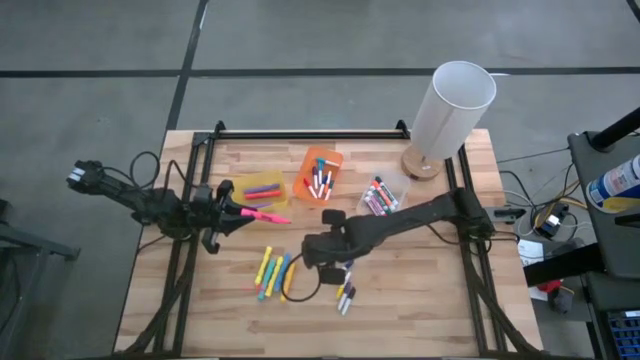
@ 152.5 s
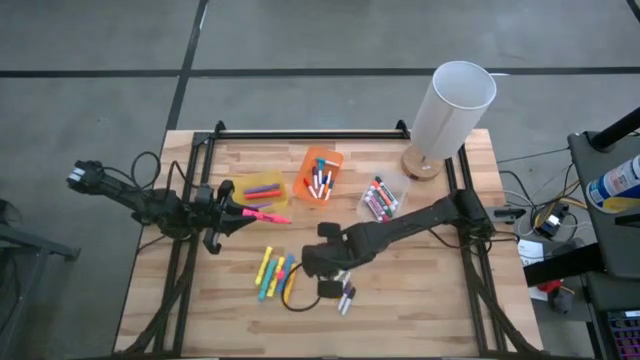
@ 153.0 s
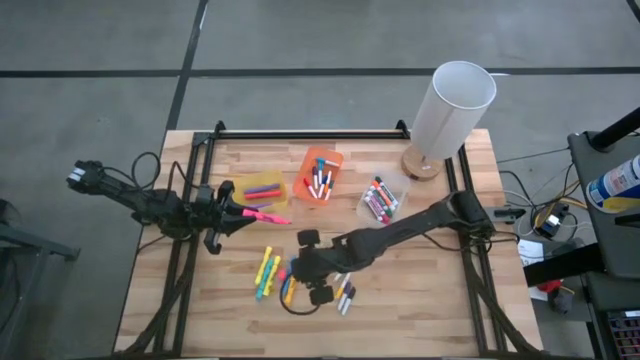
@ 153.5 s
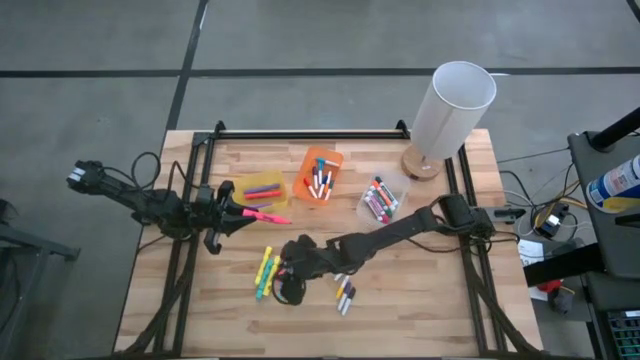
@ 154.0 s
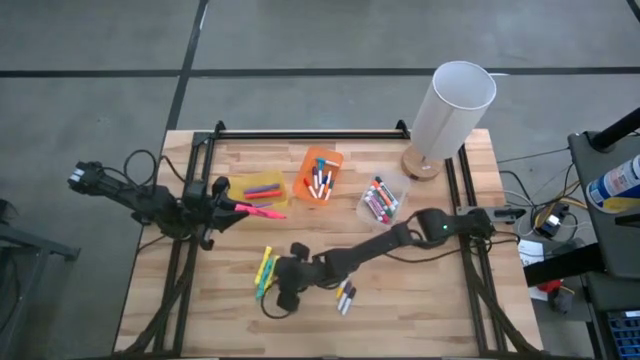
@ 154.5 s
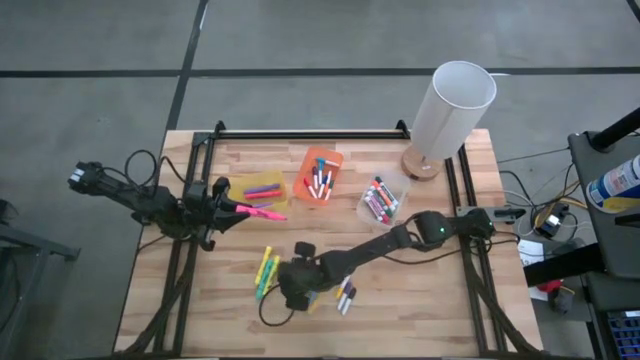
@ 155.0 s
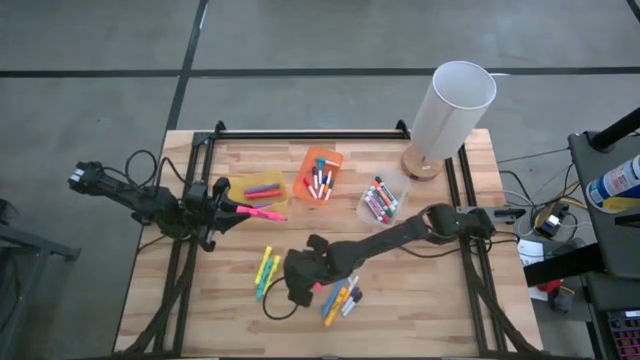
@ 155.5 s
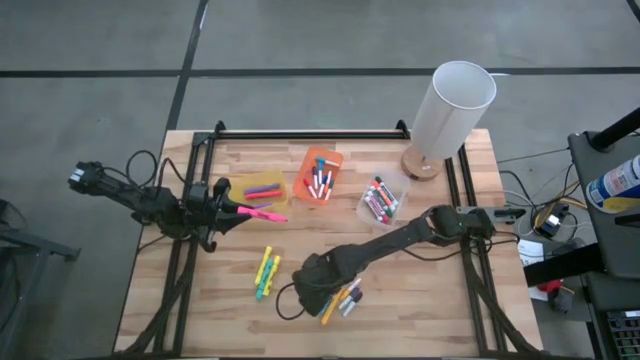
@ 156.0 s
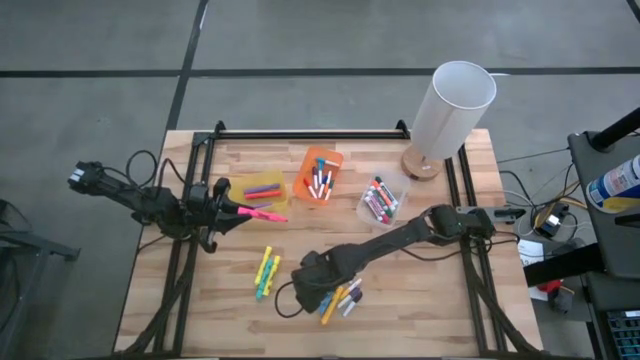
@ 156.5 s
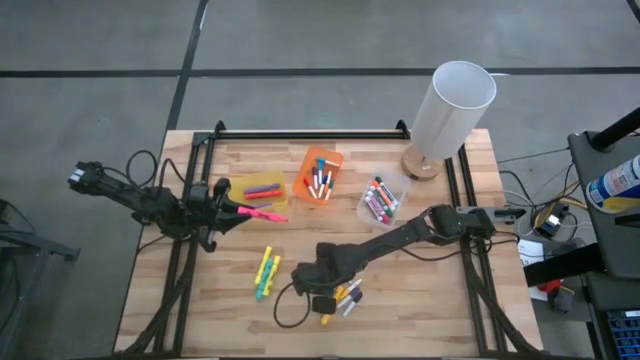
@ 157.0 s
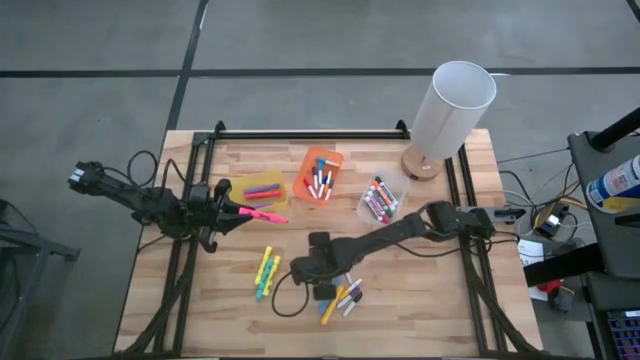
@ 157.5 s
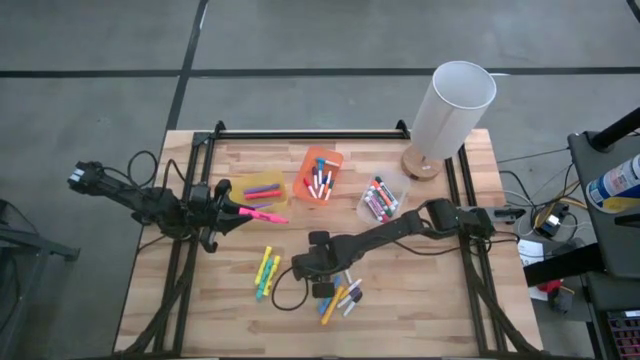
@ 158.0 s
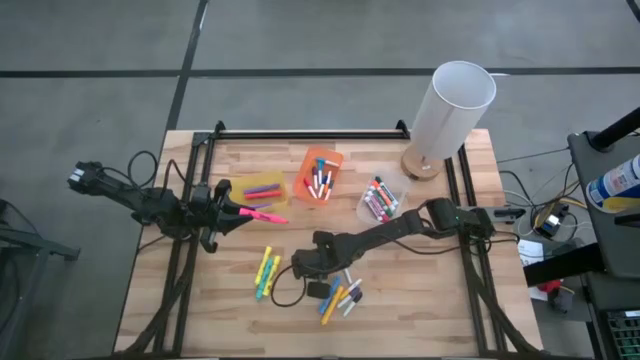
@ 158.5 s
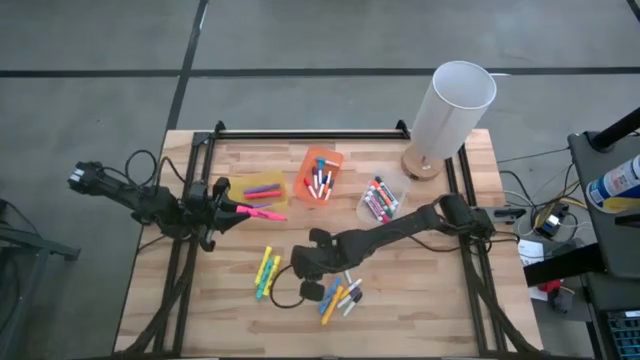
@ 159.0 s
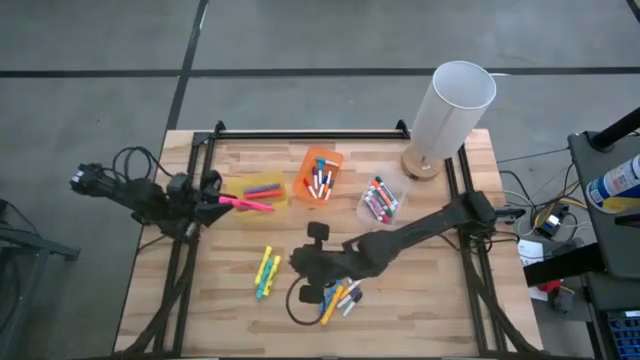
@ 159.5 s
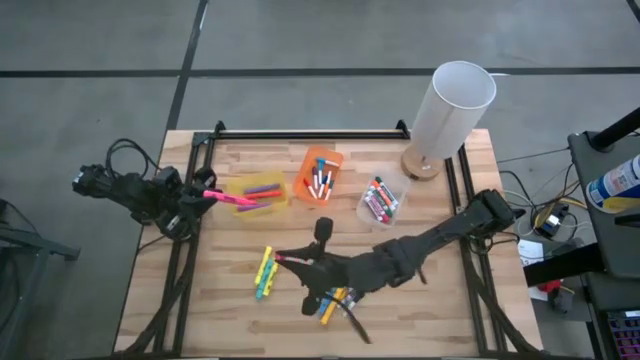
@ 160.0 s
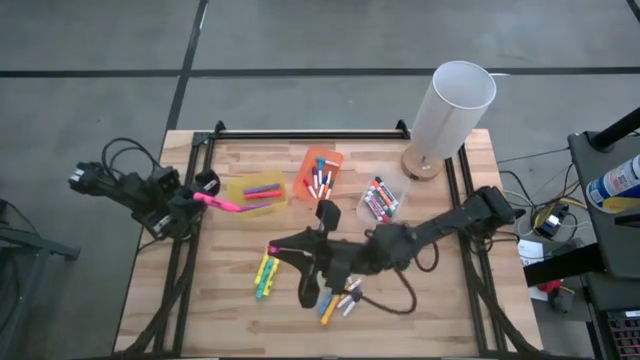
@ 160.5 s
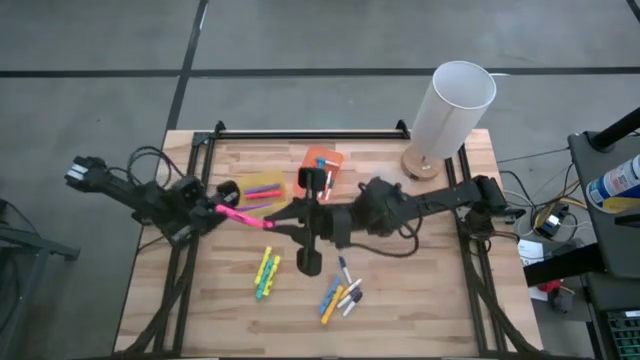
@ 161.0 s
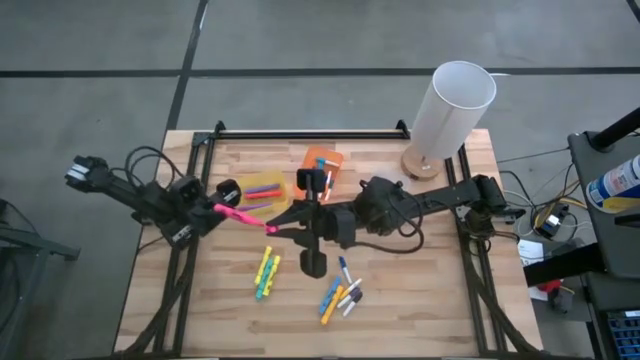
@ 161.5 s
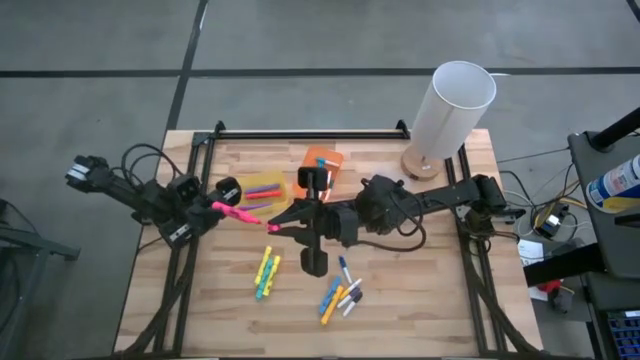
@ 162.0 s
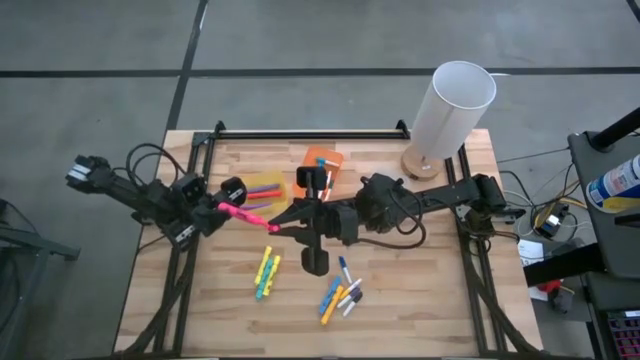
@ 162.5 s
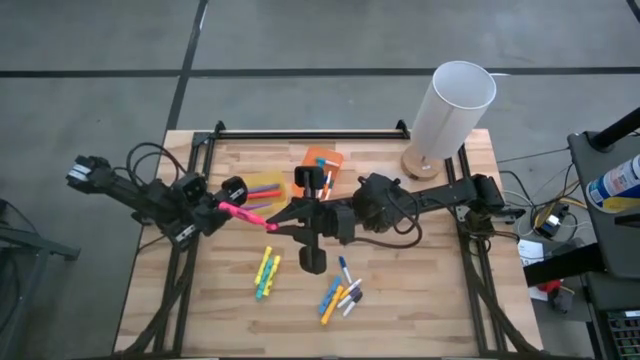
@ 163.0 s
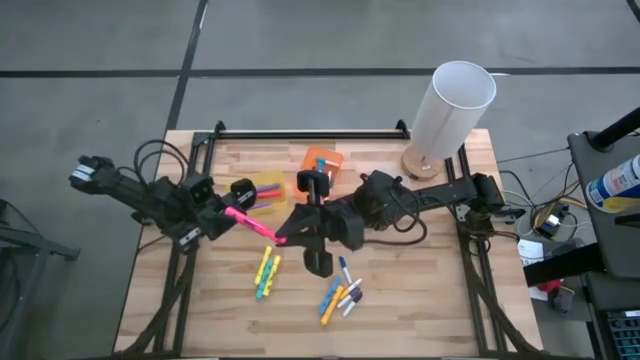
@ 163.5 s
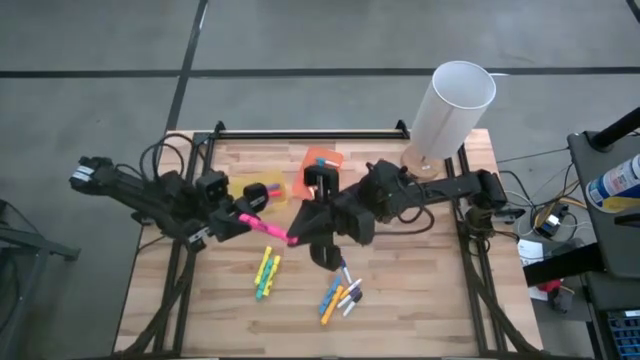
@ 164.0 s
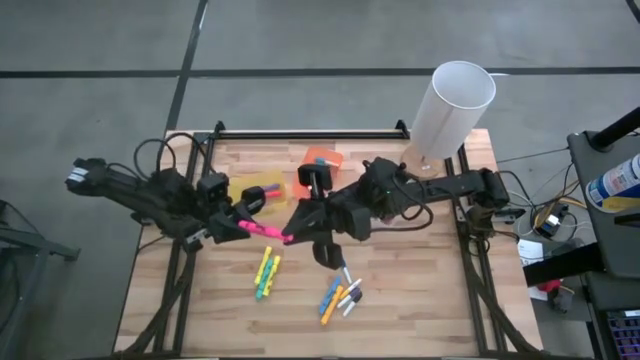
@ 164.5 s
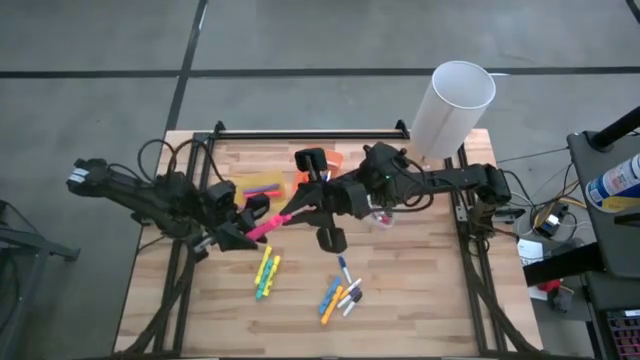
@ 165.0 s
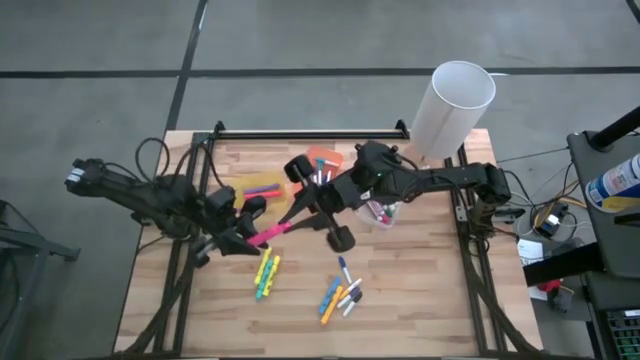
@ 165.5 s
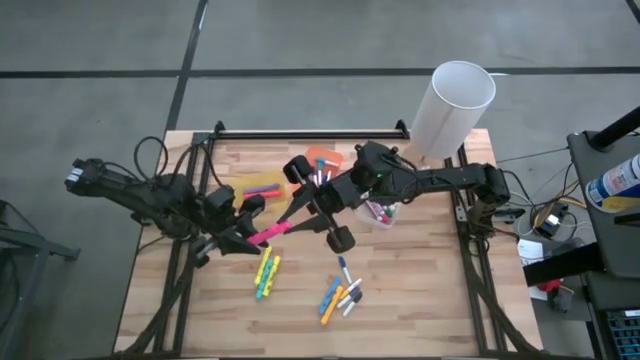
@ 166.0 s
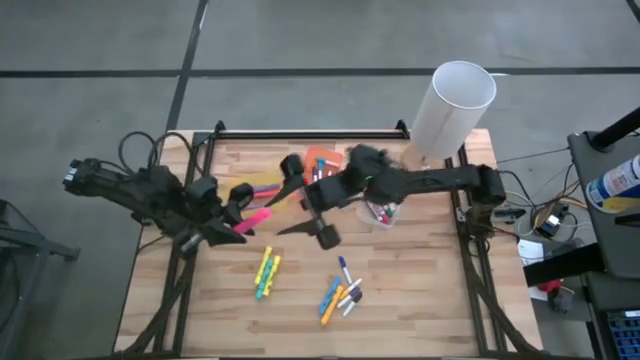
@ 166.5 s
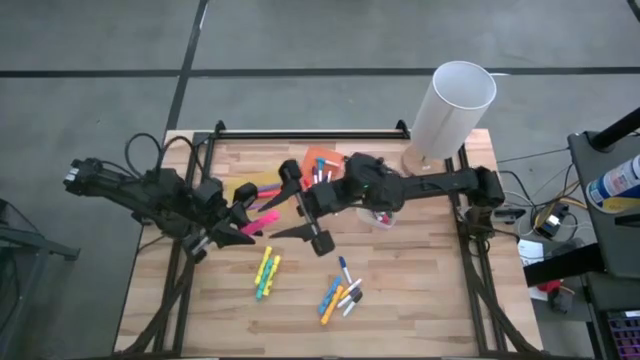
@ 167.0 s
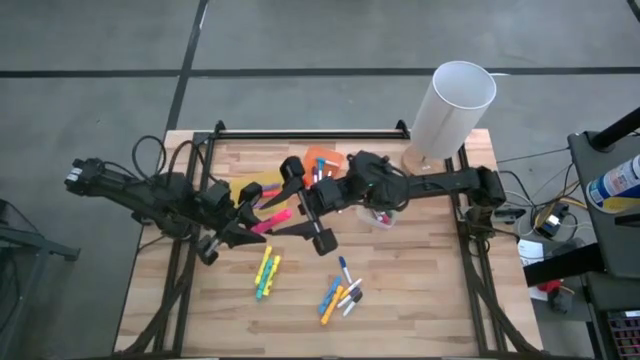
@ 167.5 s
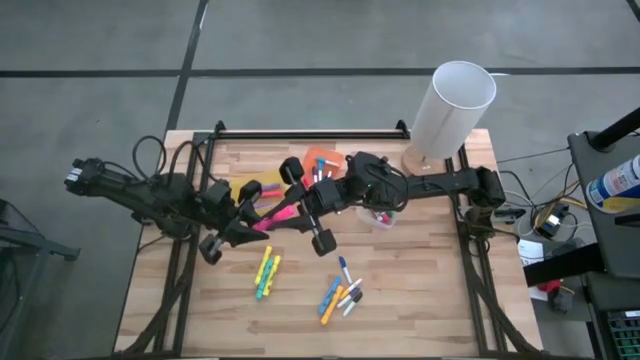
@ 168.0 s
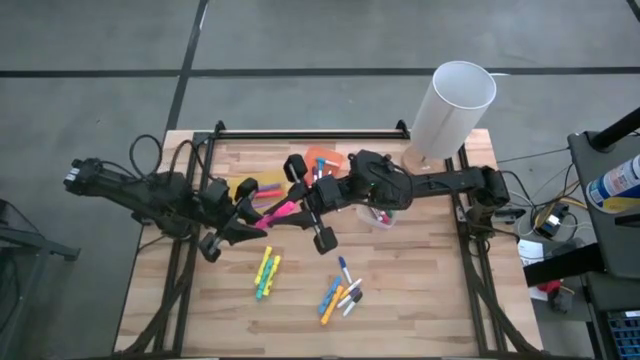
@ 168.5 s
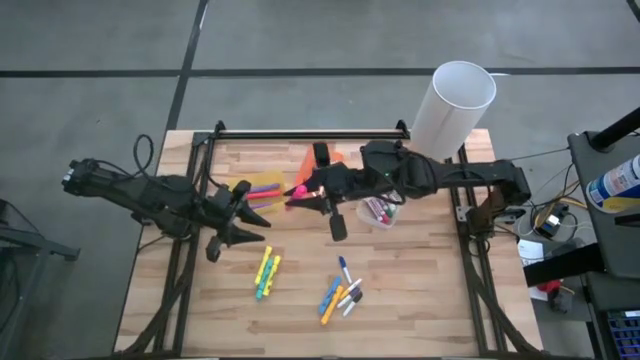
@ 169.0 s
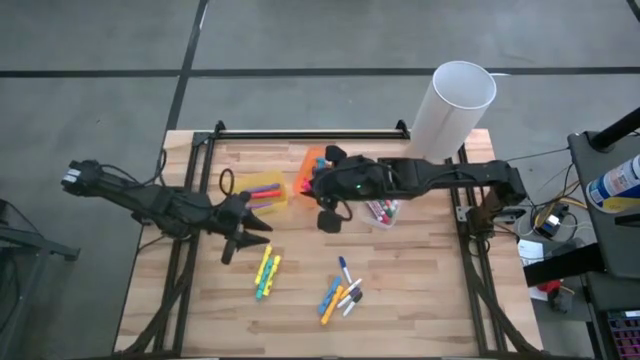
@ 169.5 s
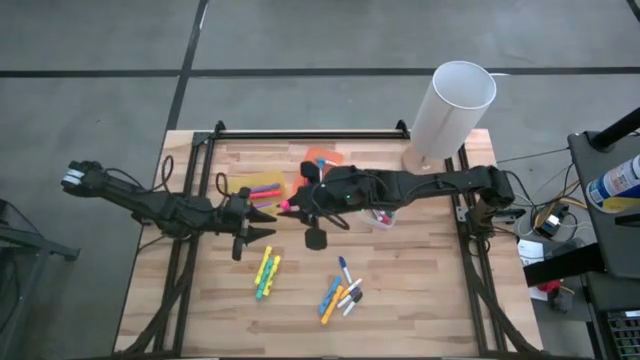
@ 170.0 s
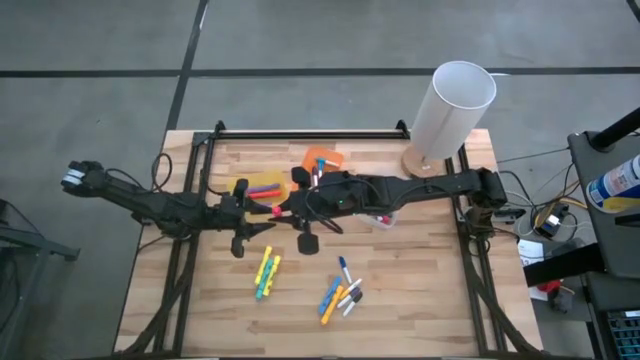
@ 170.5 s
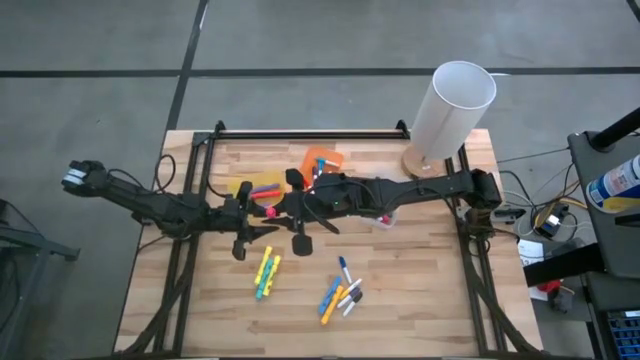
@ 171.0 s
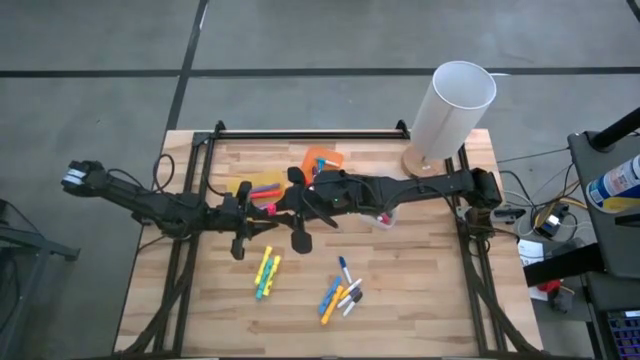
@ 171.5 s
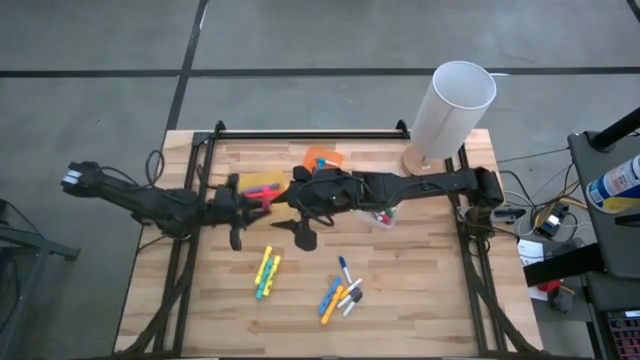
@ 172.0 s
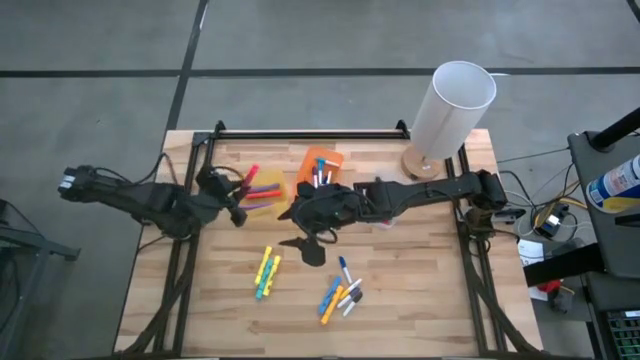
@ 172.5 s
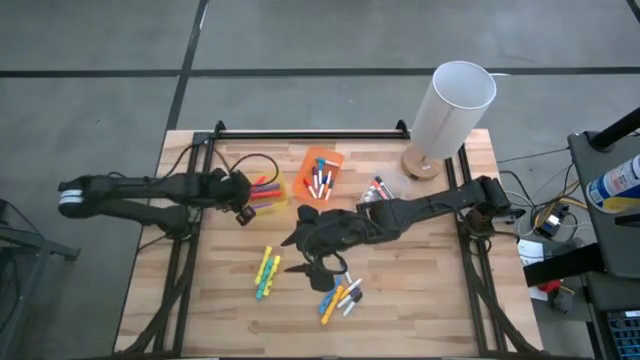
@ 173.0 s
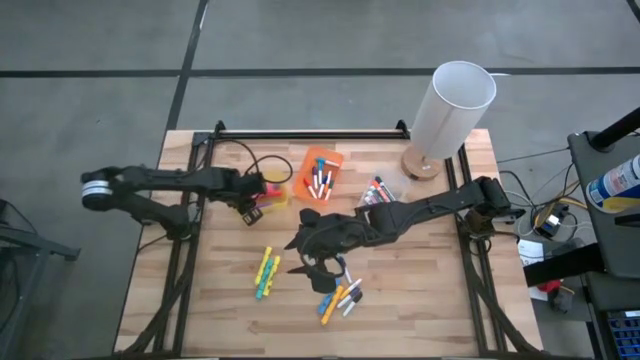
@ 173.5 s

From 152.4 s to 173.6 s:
Task: Pick & Place Markers
Put the pink highlighter pen into the yellow bin

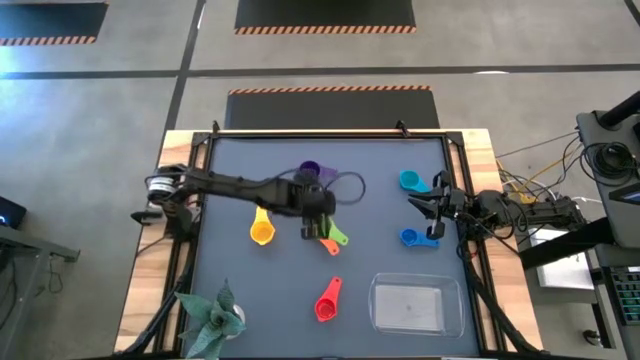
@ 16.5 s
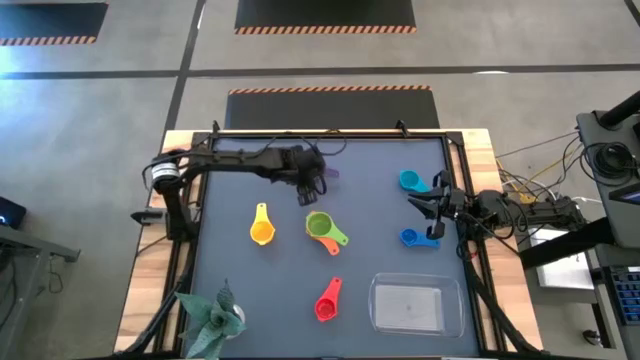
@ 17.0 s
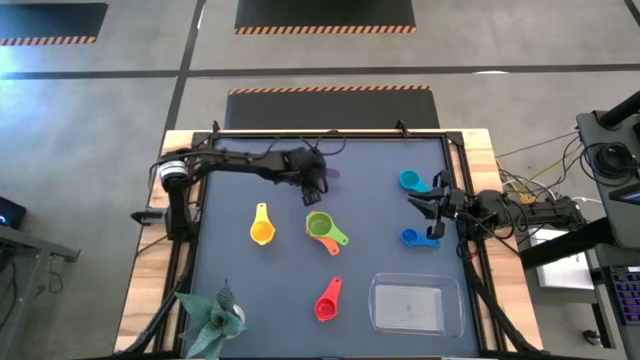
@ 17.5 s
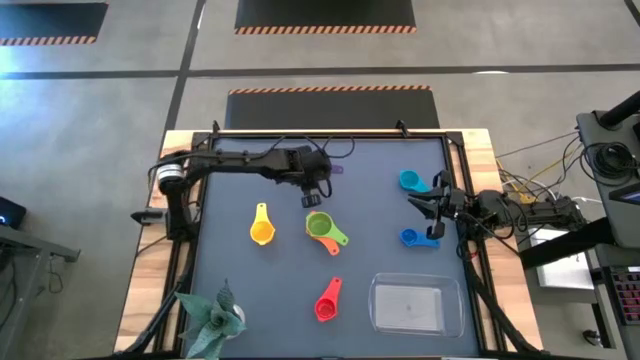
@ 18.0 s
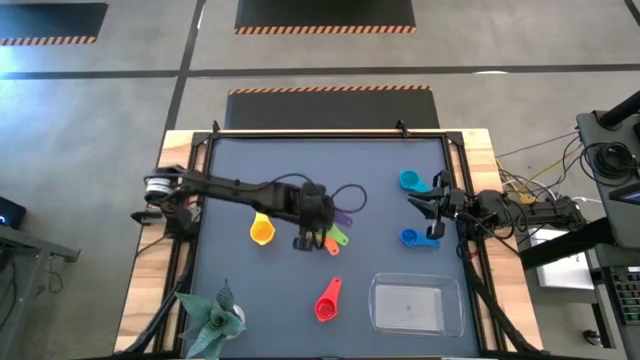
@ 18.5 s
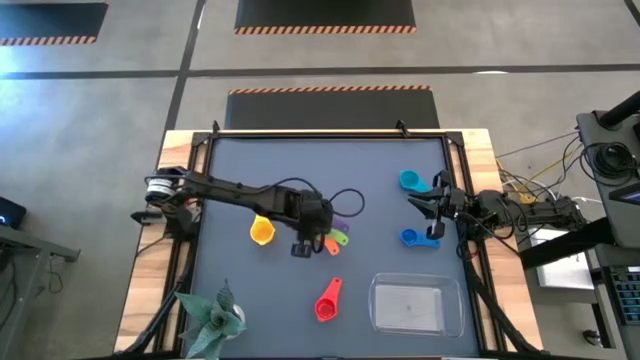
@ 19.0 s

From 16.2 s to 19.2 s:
Task: Nest measuring cups in basket
Stack the purple measuring cup on top of the green measuring cup
